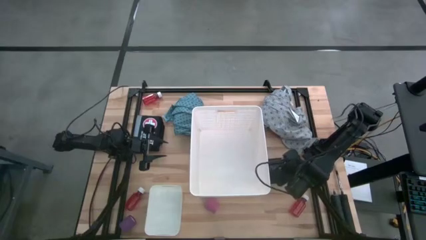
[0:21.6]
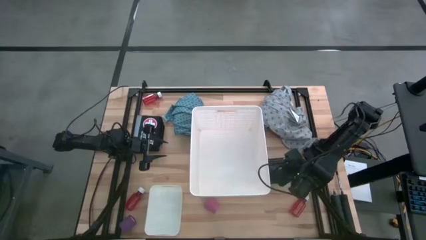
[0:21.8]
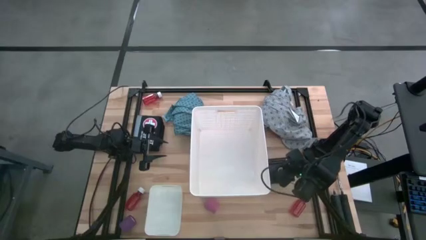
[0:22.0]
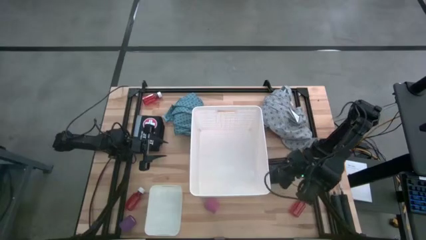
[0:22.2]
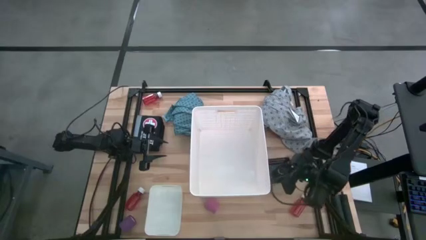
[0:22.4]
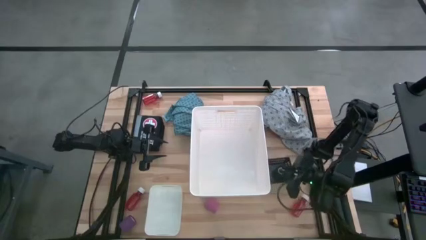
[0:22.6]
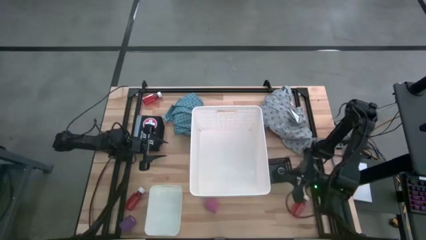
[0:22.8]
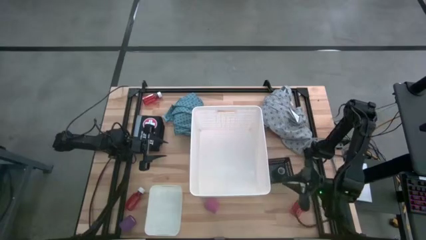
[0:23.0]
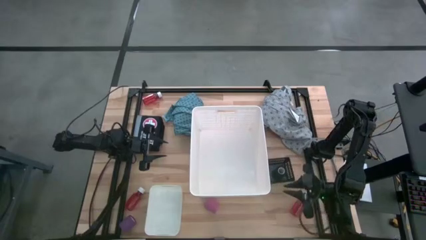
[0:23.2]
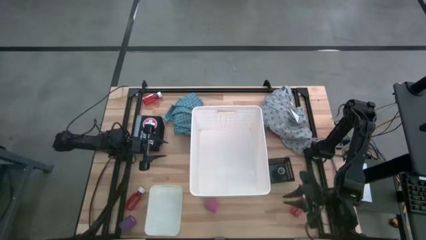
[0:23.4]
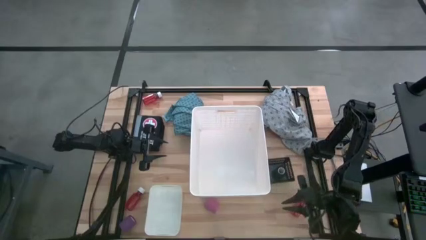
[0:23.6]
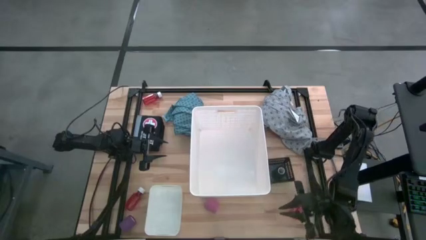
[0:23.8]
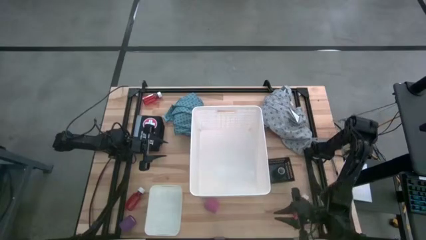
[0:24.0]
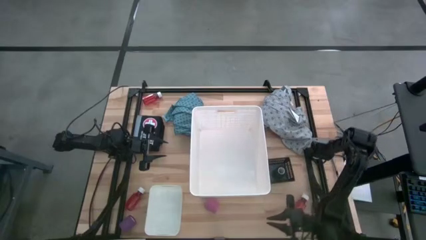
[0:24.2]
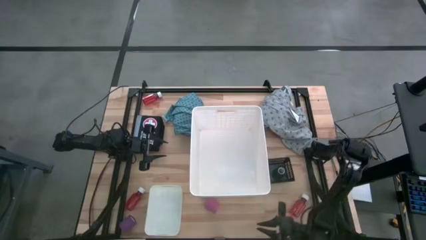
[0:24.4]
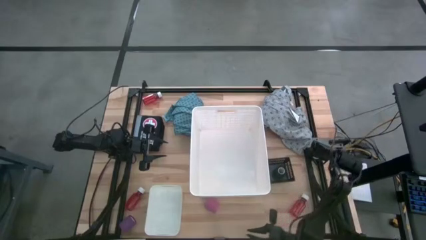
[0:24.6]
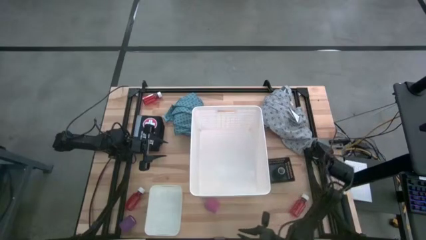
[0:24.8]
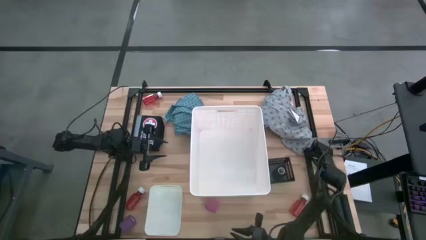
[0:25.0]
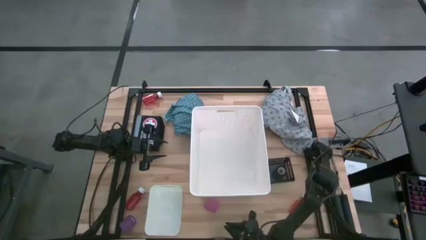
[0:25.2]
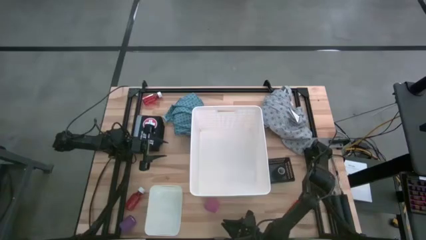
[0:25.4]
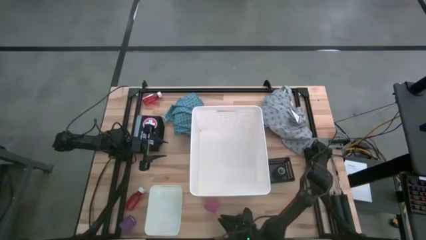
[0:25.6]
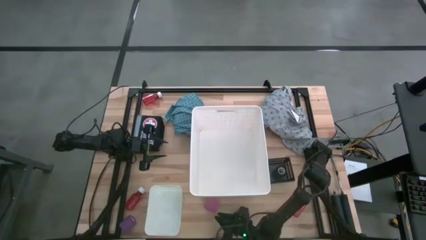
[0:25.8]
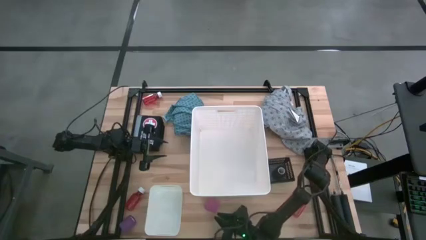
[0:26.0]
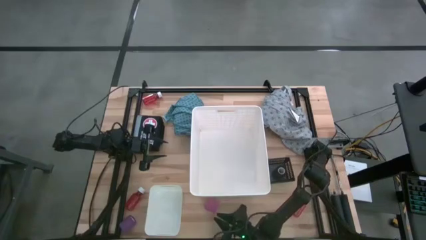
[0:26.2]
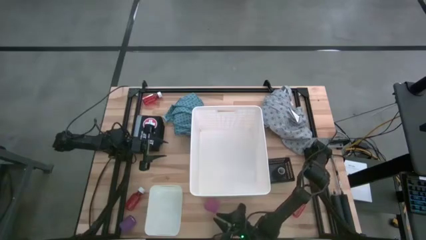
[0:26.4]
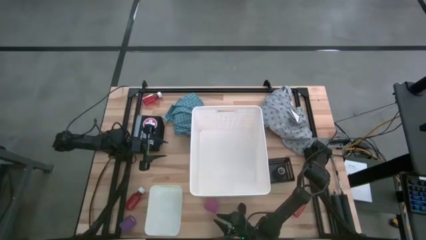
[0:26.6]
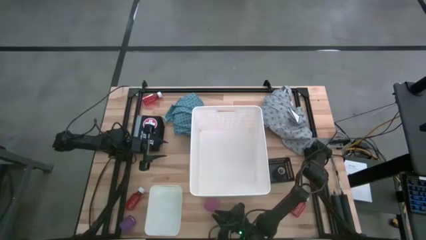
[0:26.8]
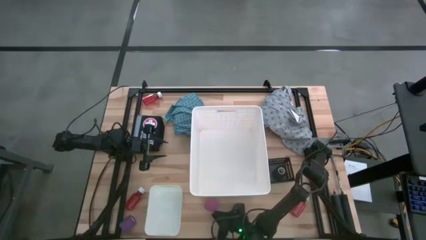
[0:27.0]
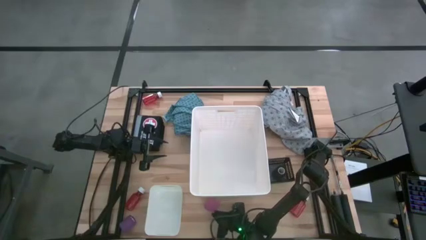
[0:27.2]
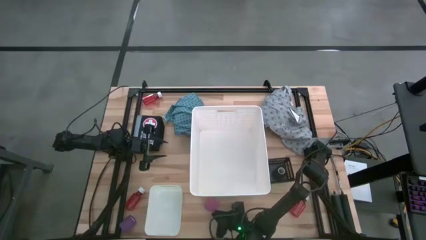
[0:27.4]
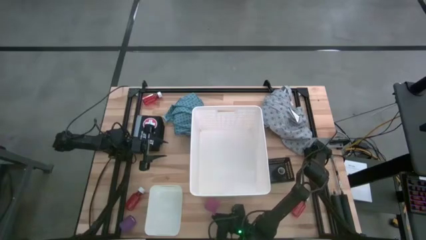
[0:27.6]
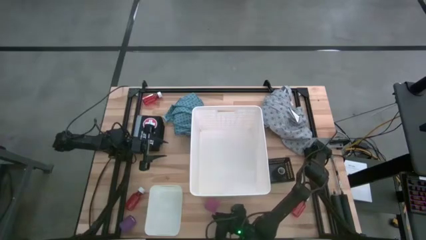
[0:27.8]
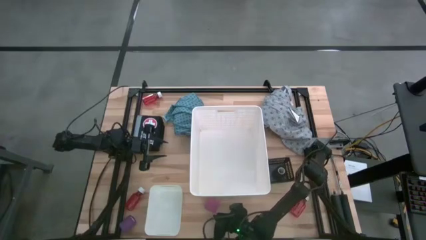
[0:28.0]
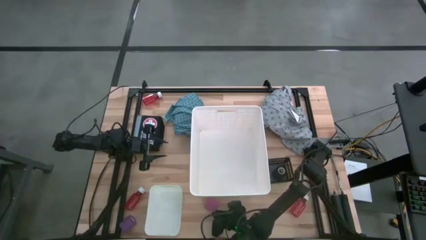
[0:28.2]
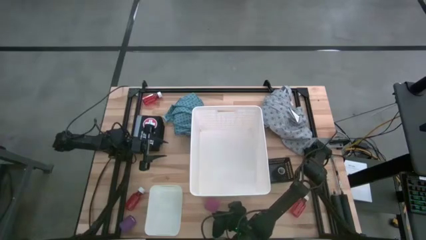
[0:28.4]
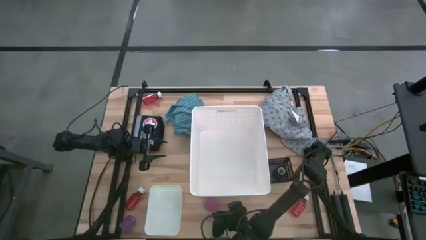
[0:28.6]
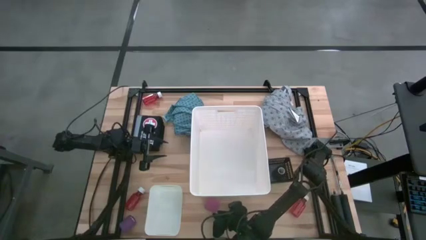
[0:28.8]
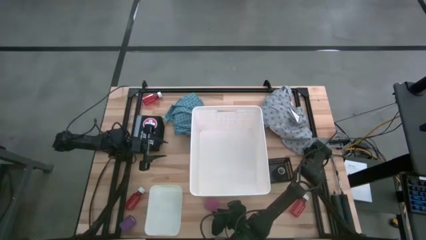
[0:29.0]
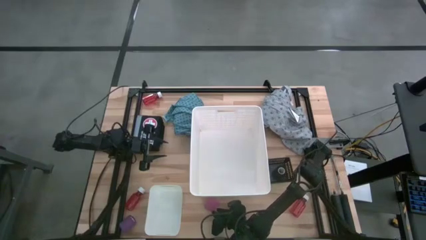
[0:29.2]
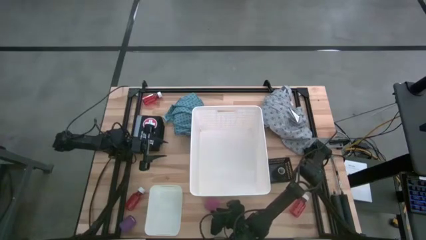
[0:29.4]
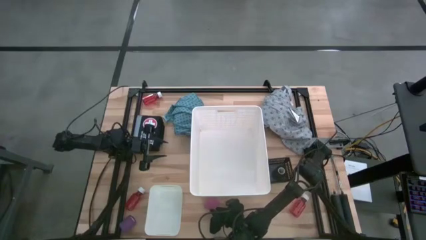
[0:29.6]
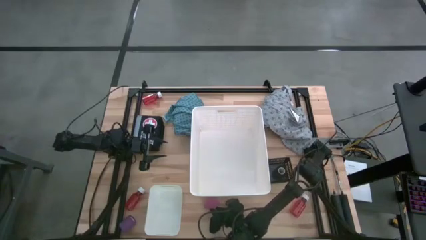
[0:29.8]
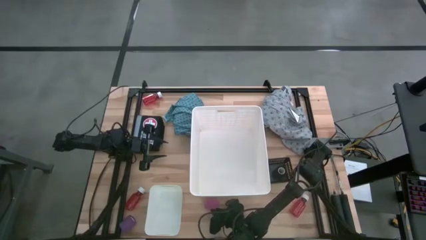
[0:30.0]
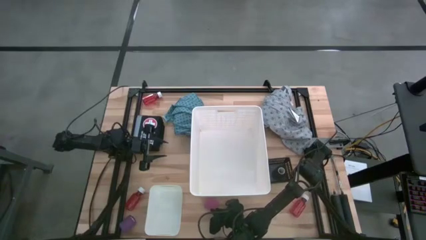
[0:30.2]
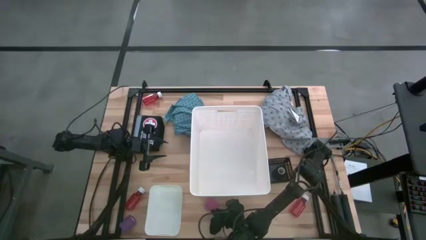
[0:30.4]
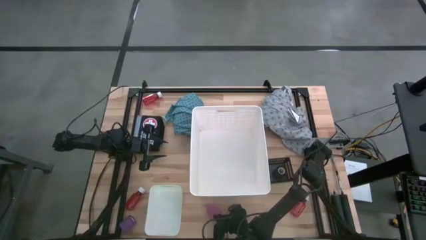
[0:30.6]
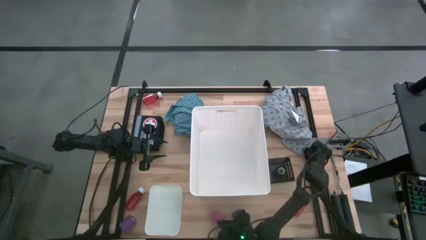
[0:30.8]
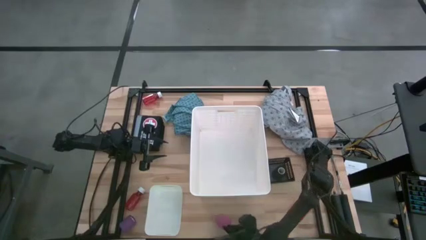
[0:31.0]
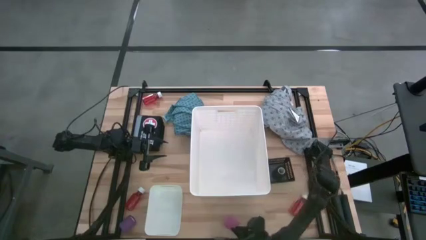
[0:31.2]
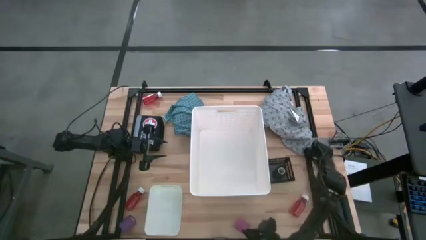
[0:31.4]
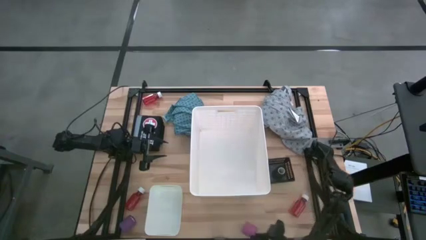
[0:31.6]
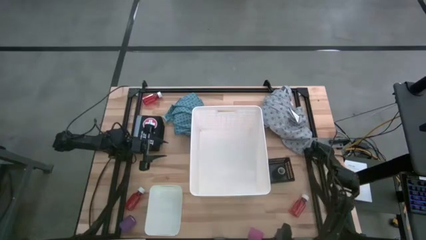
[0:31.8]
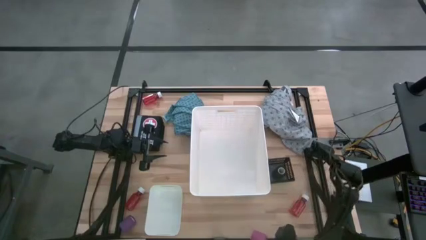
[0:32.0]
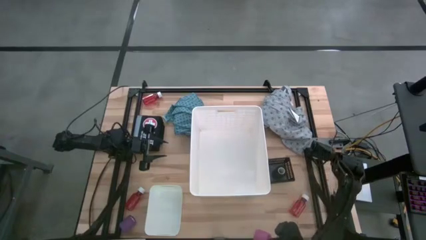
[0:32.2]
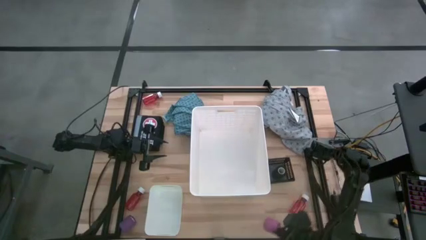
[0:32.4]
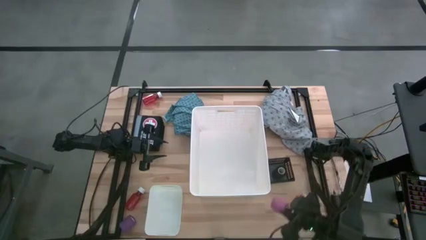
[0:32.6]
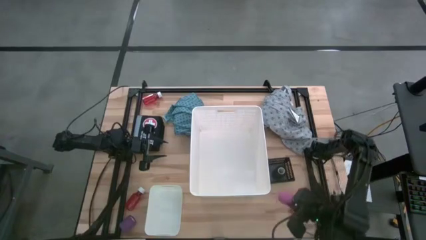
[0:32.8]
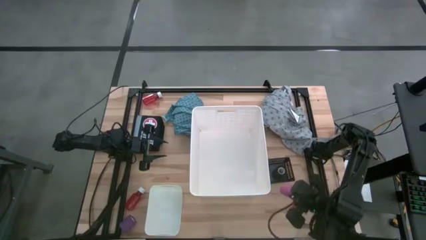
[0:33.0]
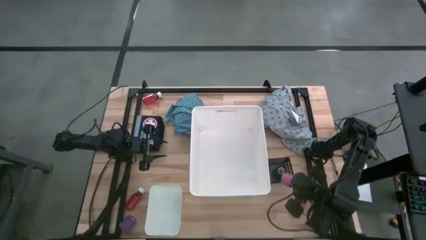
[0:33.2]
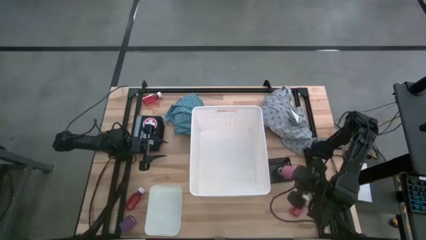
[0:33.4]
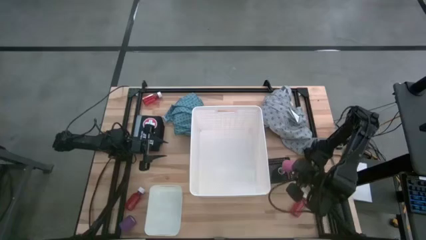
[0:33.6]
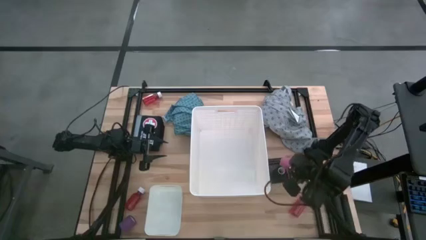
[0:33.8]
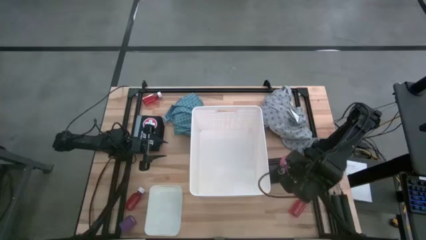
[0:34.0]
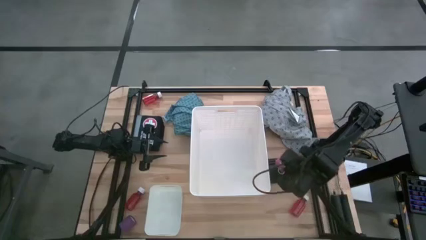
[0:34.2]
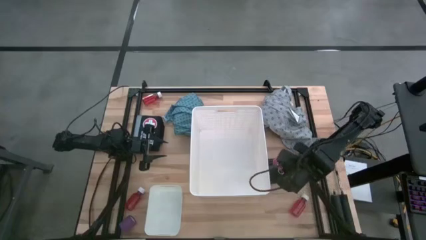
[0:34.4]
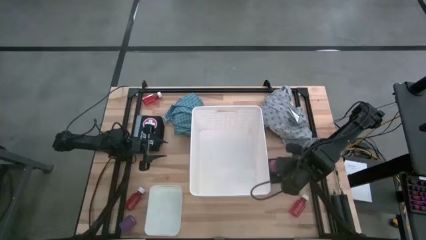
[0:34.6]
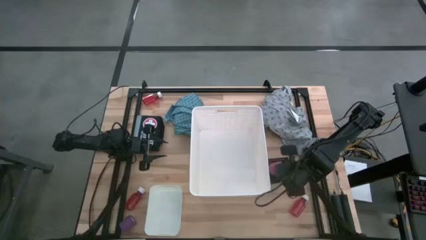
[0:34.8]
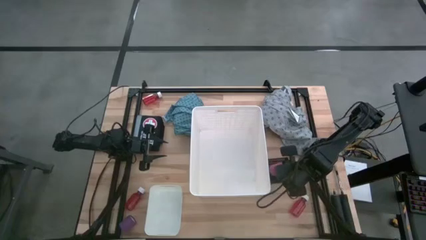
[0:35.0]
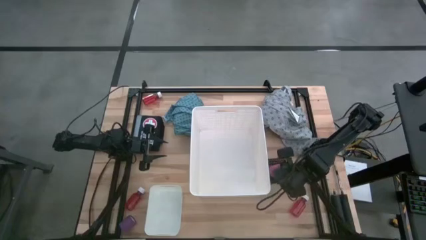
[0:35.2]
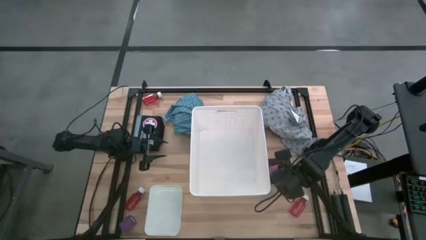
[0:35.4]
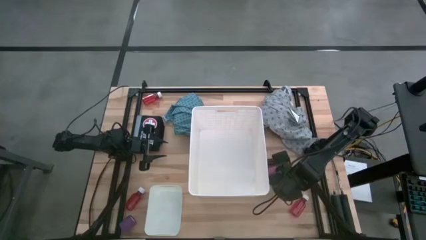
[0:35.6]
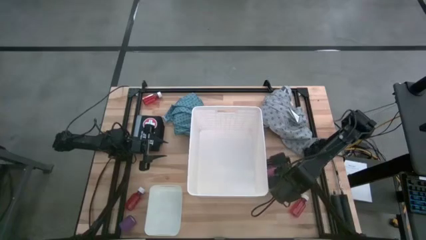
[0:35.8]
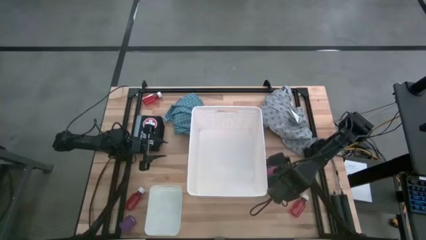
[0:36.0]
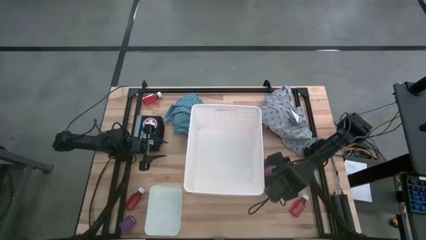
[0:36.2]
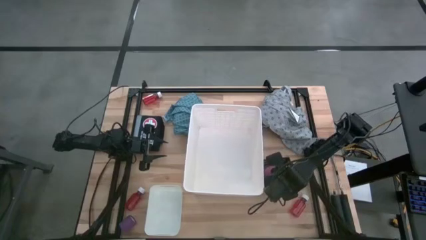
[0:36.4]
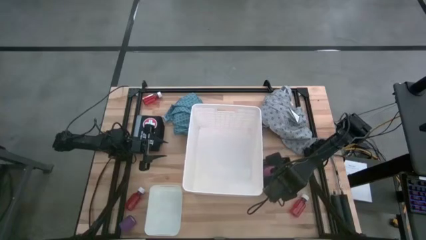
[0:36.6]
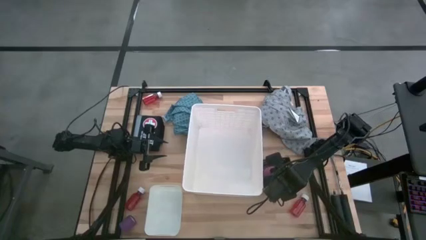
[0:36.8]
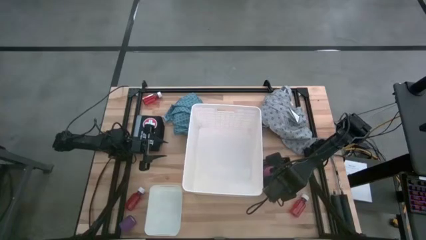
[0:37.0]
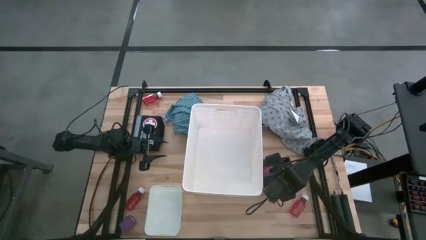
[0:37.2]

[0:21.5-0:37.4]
Task: Pick & place medical supplies in basket/bin
Put the pink bandage into the black bin
